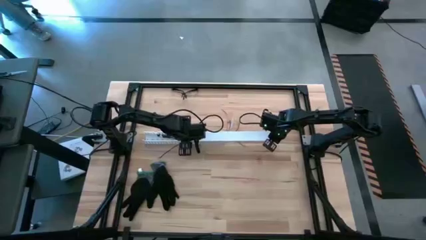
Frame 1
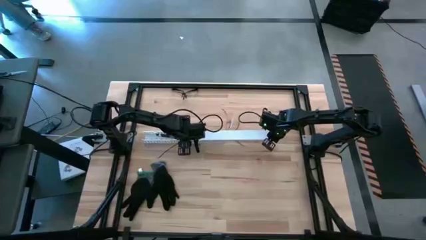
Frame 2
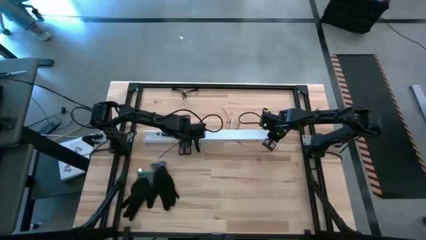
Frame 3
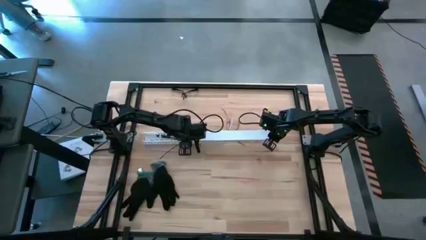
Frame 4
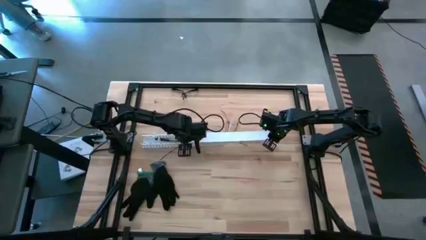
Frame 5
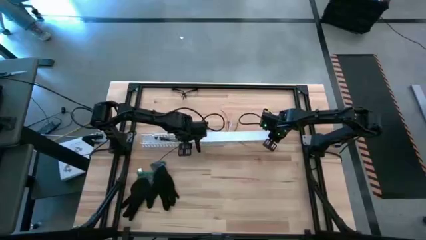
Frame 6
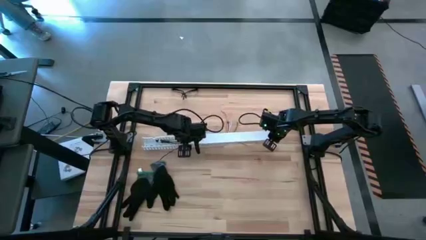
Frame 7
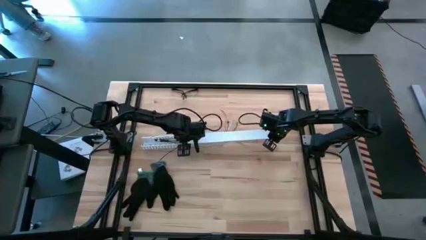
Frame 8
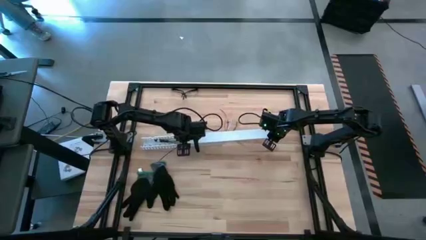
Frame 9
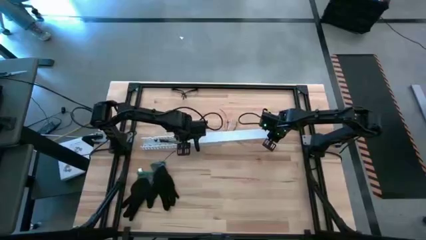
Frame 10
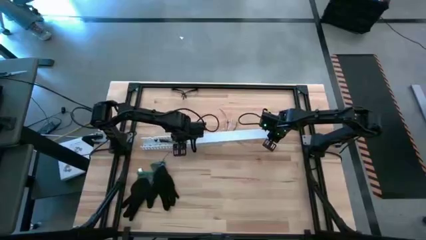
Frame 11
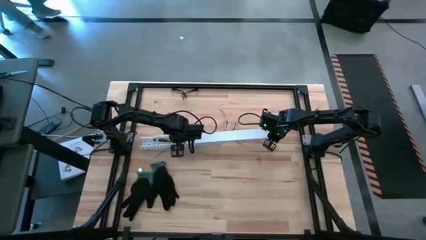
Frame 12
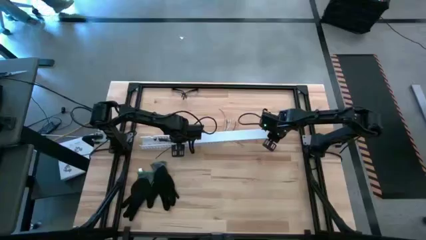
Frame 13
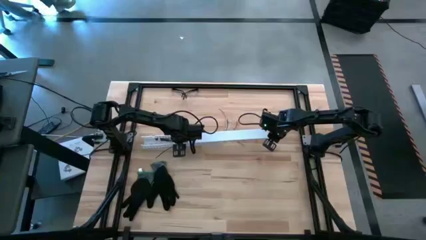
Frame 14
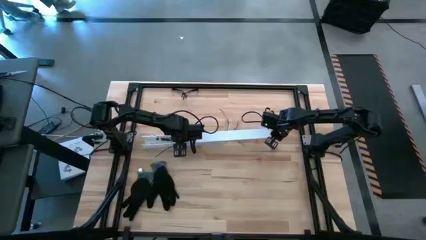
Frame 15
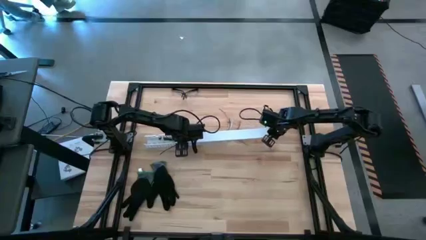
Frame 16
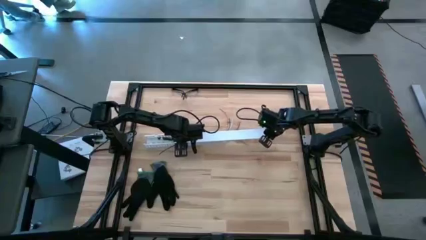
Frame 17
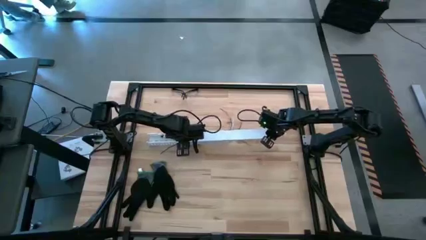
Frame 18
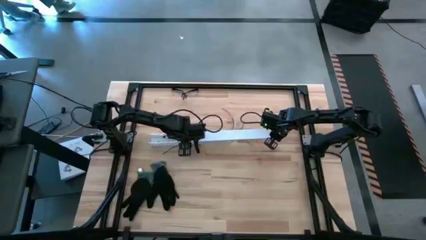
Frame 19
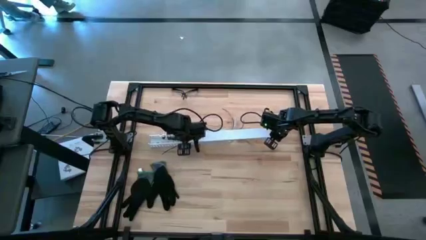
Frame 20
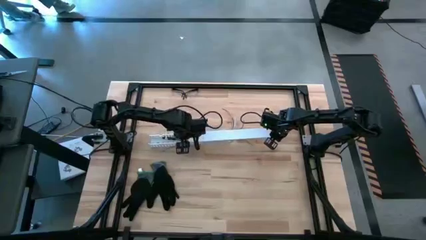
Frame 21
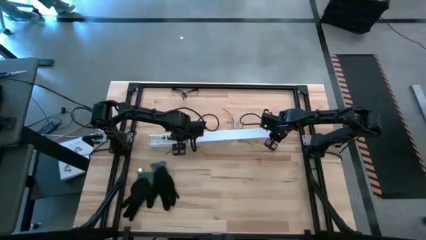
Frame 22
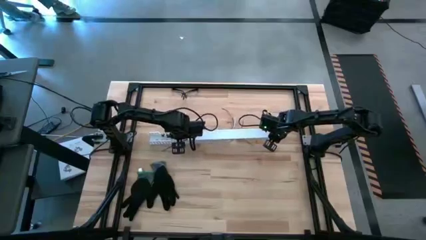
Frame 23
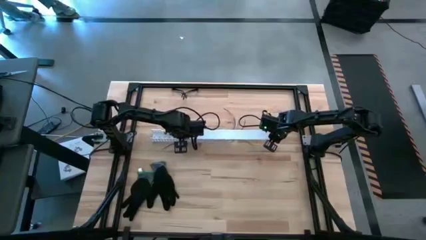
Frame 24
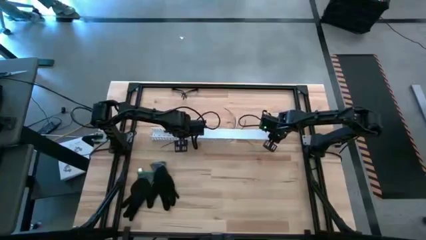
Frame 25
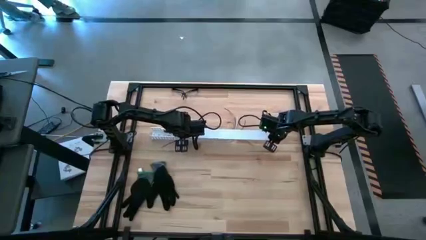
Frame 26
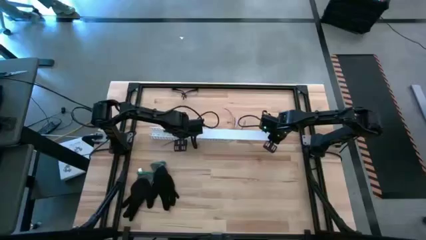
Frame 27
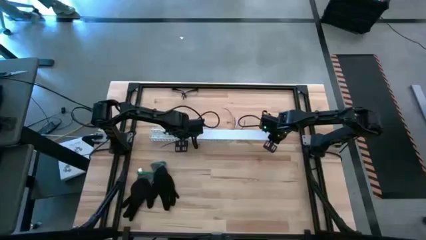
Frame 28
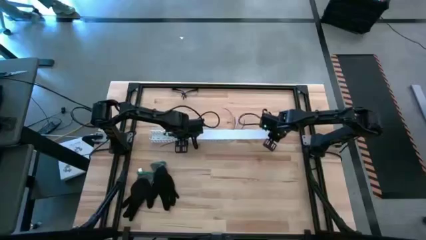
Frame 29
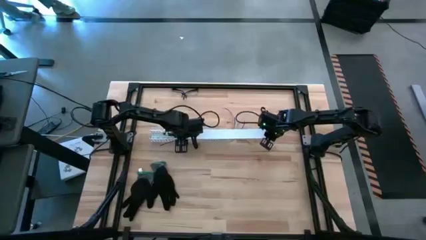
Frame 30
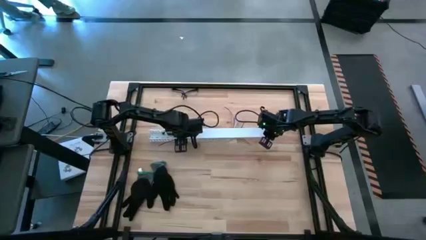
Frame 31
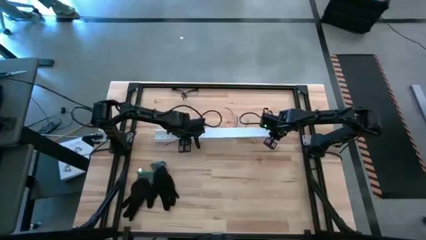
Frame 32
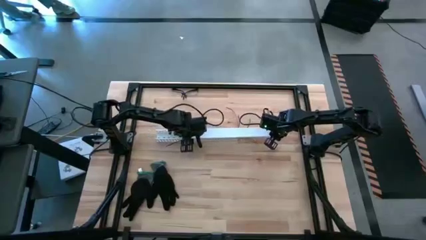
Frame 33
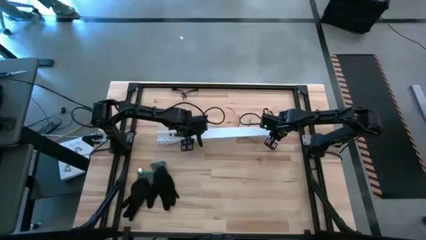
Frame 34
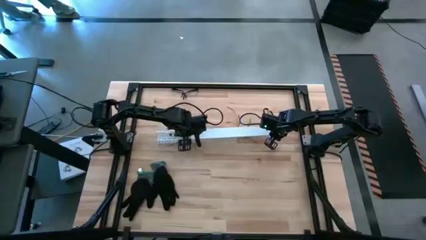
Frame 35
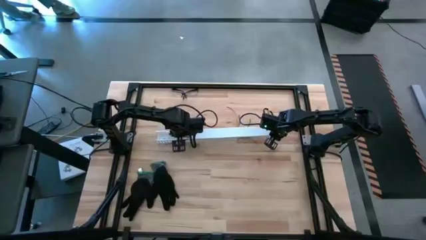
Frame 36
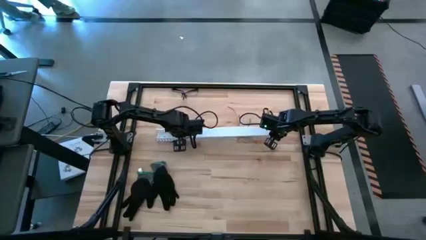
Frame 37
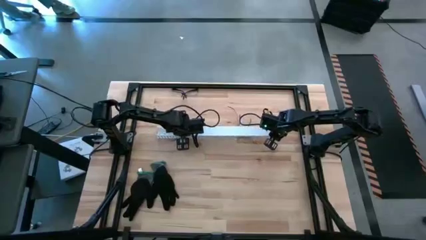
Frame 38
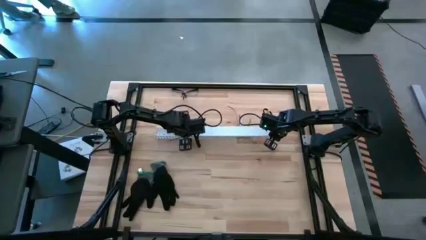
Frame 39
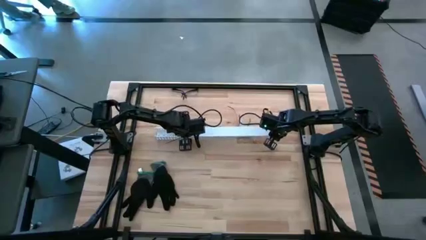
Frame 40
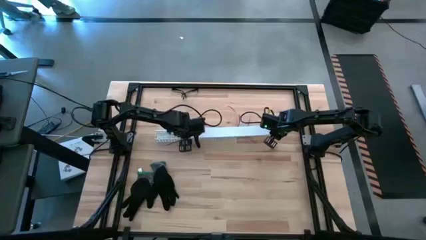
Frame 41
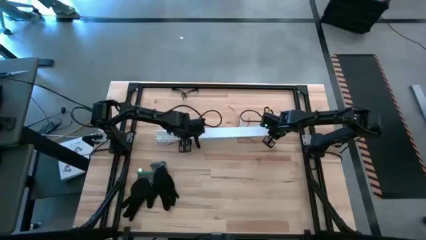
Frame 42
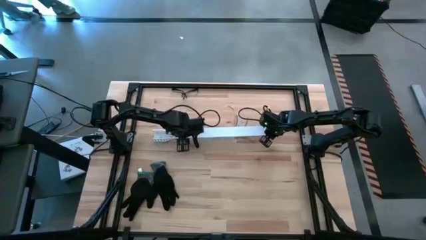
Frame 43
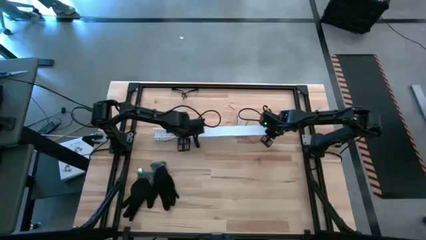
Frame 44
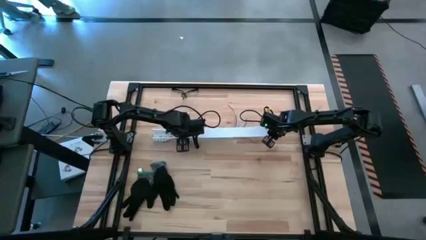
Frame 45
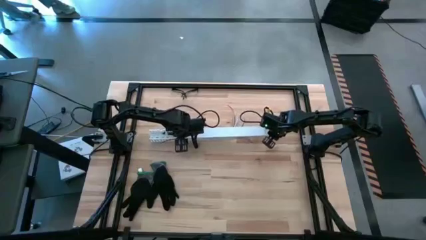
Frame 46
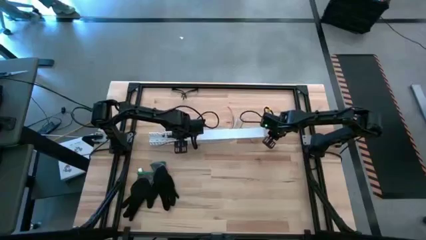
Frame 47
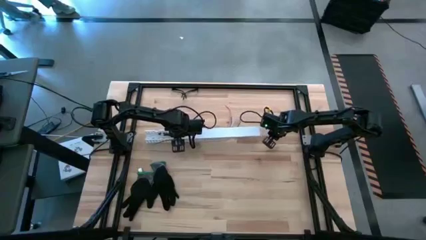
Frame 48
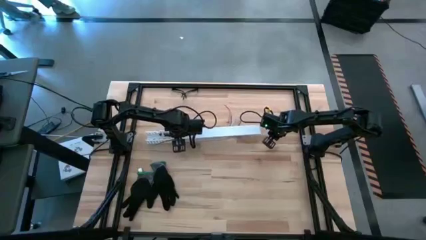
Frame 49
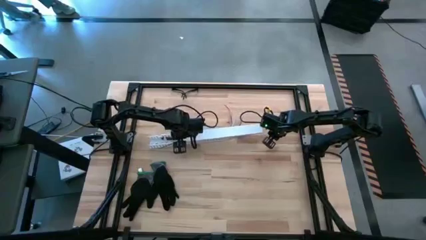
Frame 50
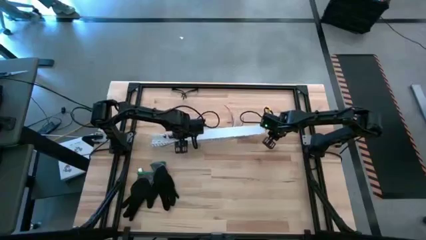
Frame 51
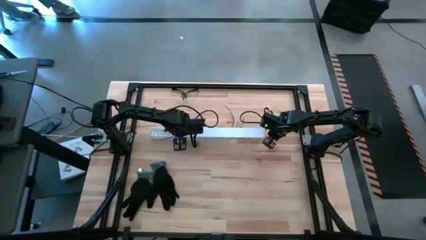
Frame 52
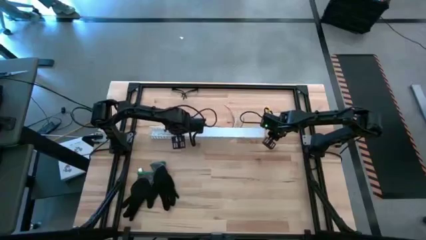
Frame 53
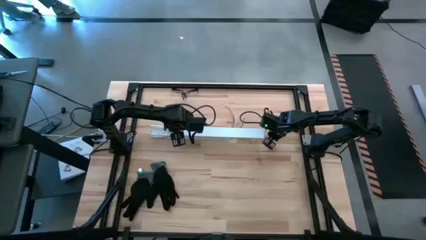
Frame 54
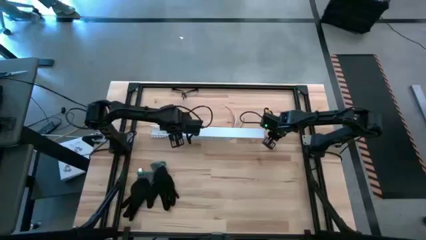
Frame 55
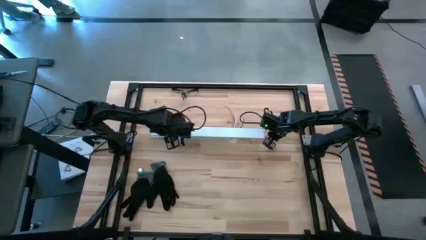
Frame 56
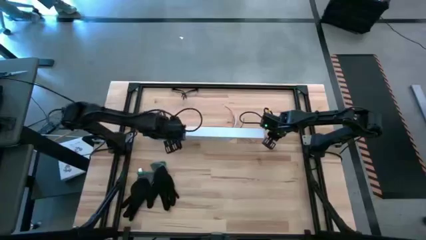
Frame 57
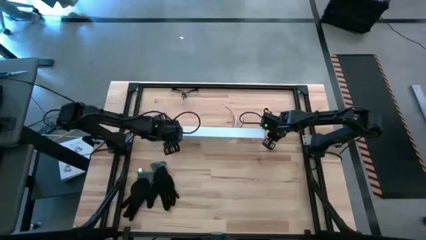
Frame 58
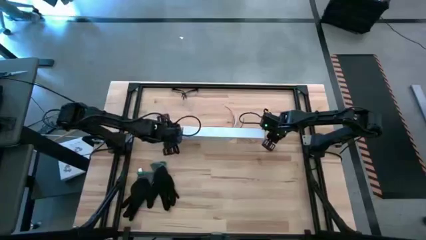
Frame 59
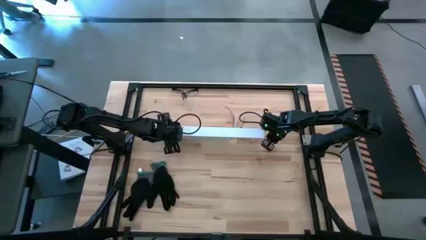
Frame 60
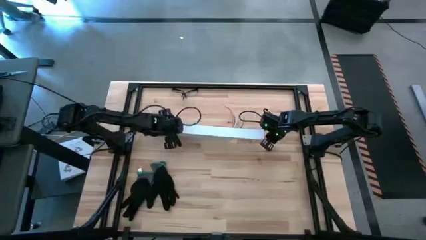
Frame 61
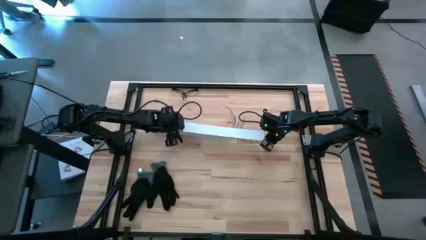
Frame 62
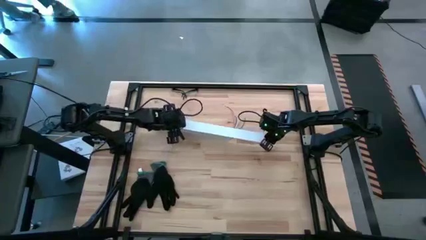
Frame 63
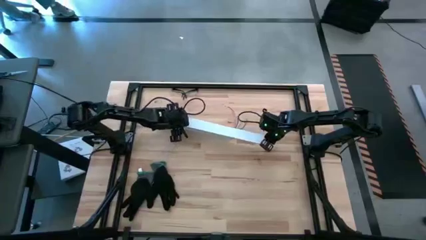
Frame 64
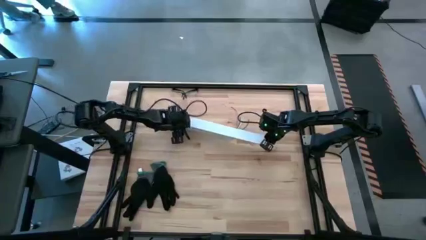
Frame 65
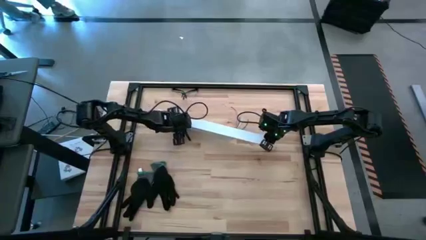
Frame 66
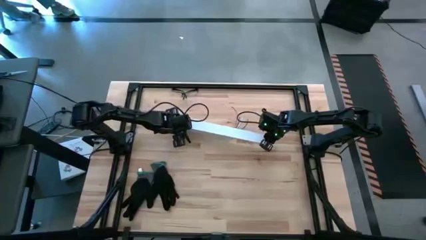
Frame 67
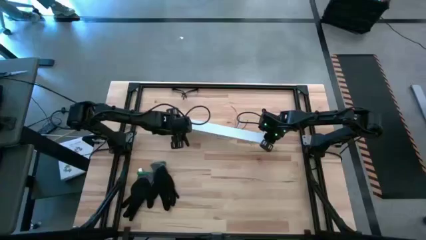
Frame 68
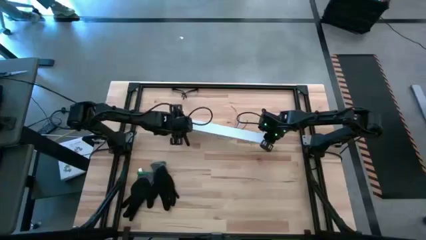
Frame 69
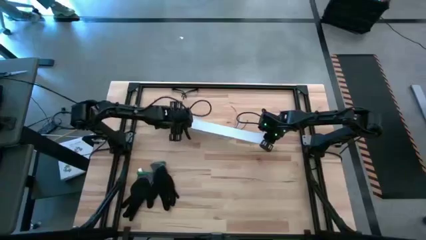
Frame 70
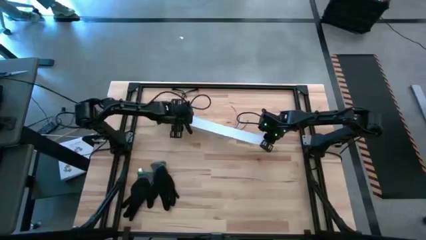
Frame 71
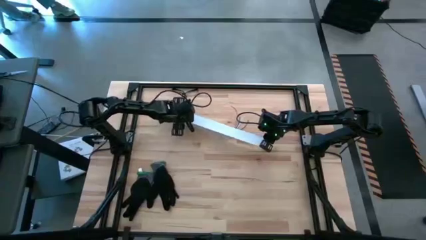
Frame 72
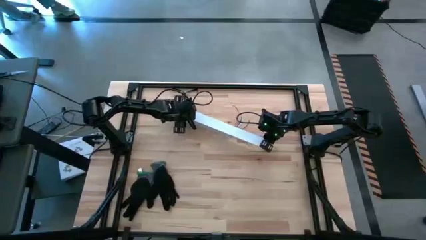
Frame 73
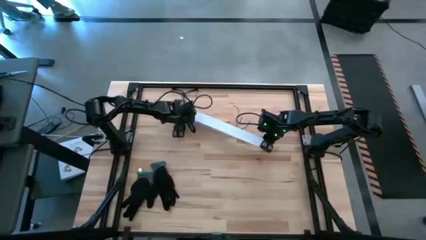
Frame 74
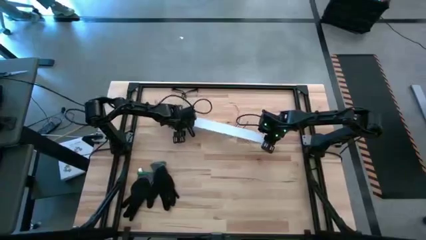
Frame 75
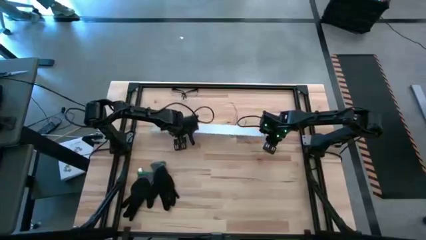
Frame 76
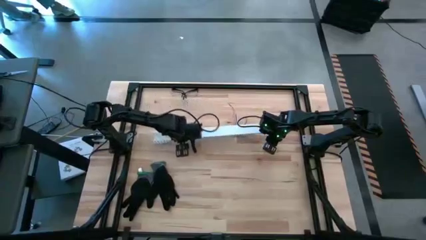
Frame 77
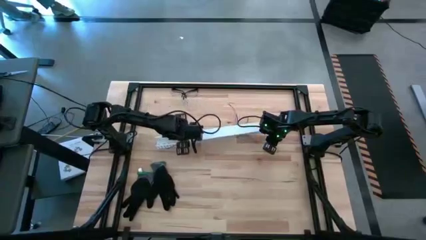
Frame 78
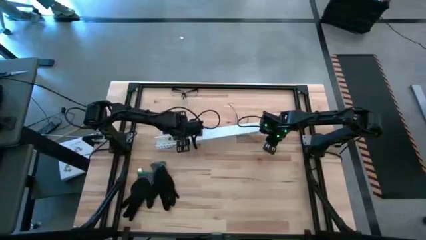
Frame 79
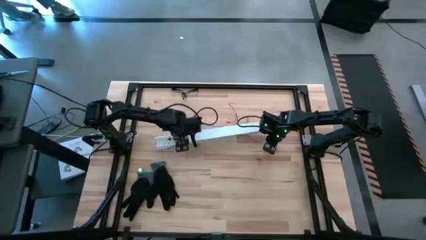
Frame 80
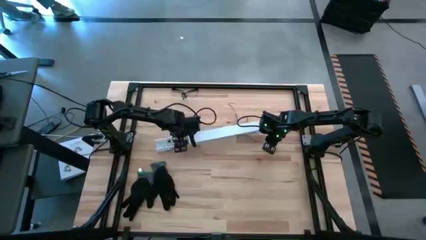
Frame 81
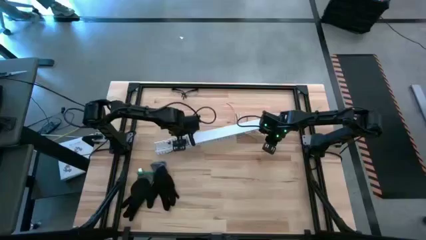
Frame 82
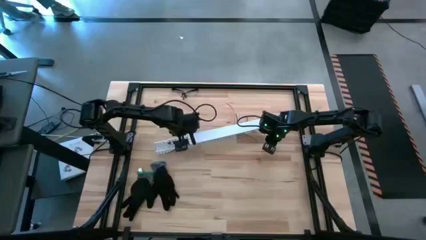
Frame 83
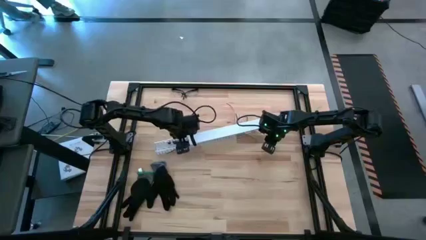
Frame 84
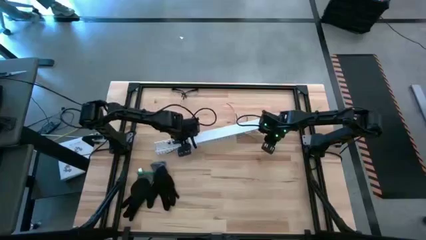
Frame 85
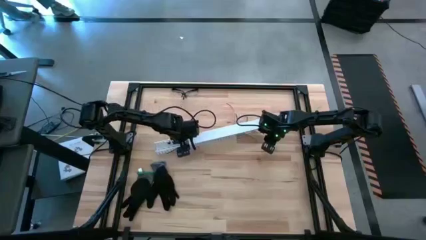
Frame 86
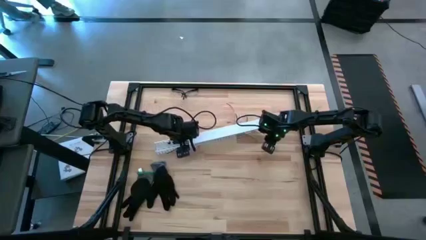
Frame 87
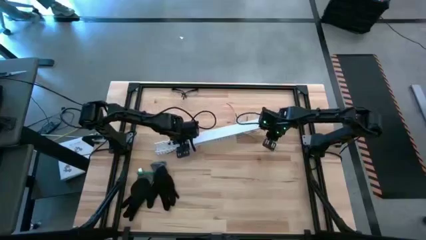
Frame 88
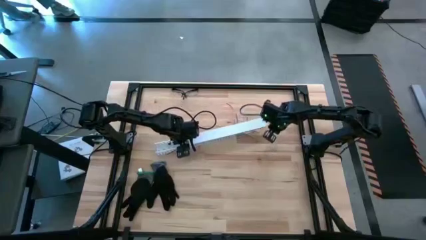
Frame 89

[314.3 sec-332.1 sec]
Task: Ziptie cables
Close the white cable duct
